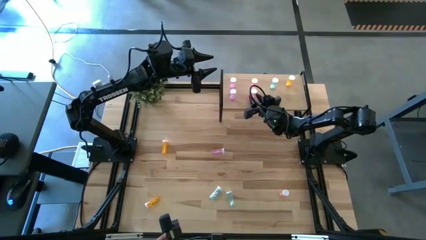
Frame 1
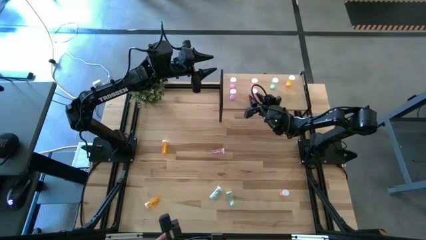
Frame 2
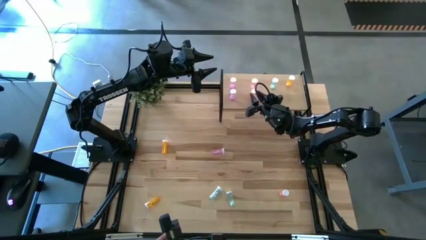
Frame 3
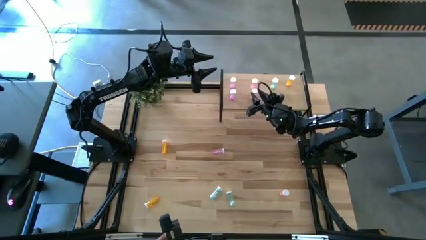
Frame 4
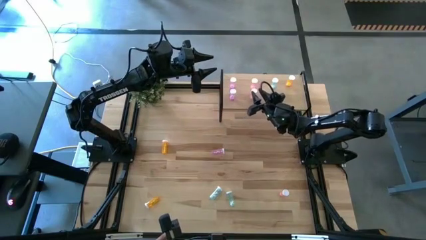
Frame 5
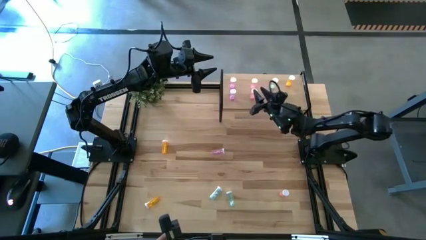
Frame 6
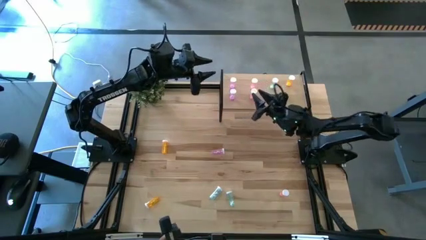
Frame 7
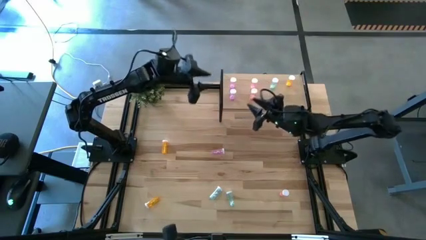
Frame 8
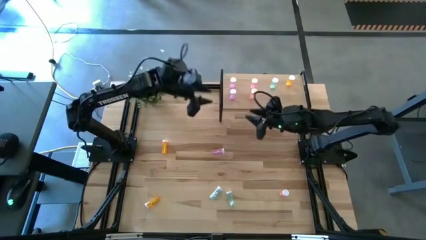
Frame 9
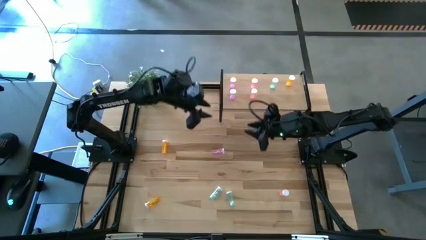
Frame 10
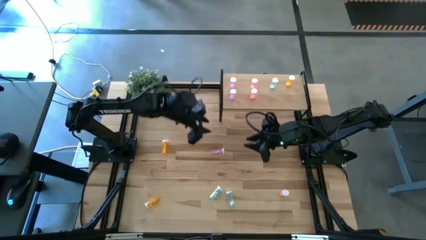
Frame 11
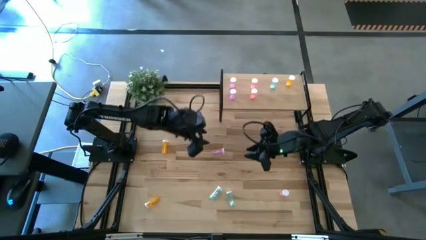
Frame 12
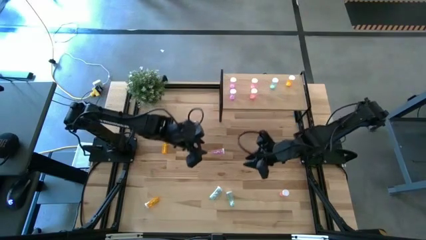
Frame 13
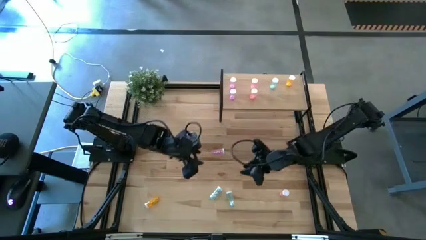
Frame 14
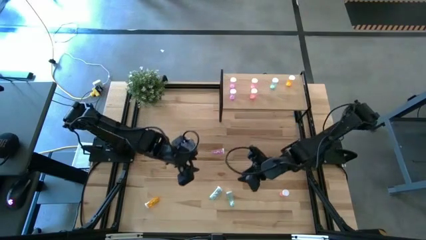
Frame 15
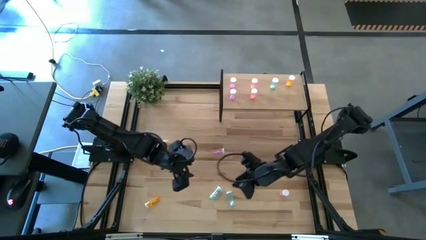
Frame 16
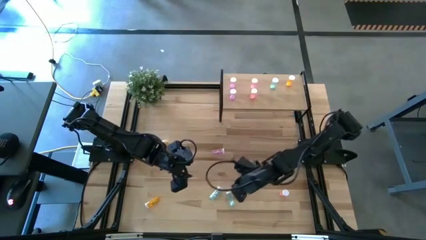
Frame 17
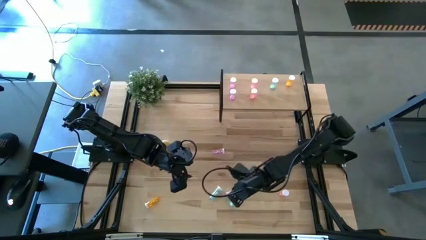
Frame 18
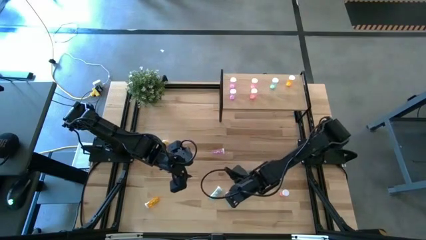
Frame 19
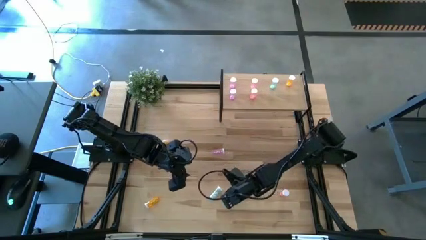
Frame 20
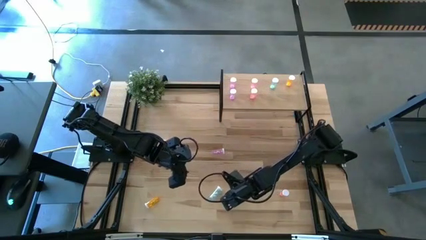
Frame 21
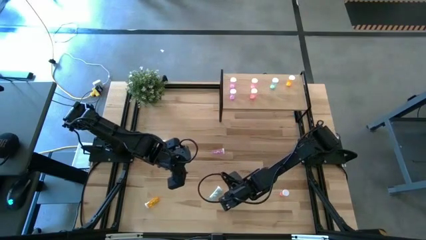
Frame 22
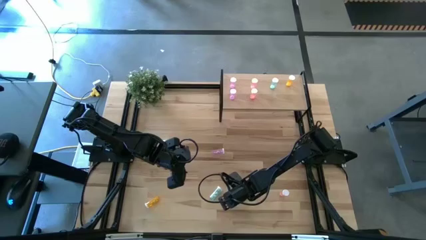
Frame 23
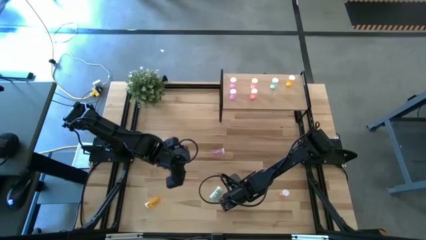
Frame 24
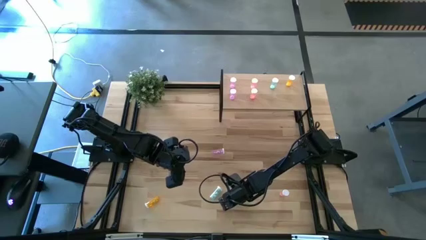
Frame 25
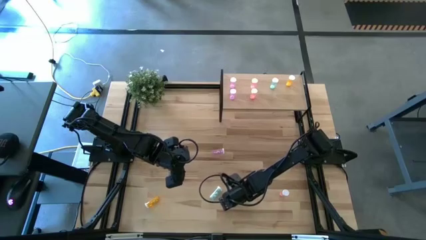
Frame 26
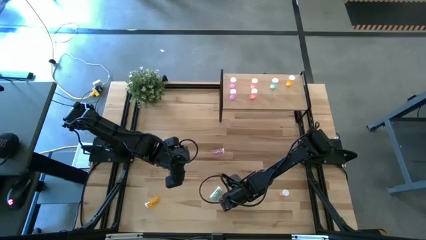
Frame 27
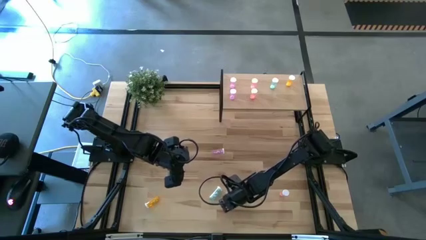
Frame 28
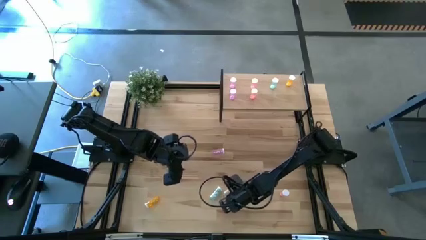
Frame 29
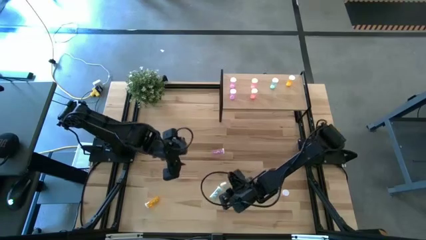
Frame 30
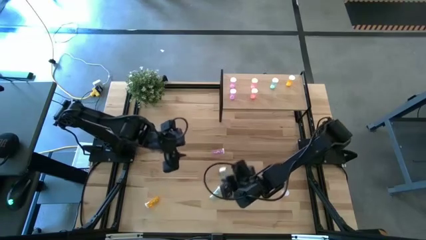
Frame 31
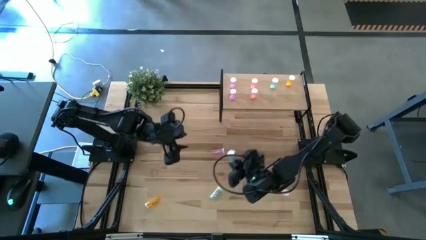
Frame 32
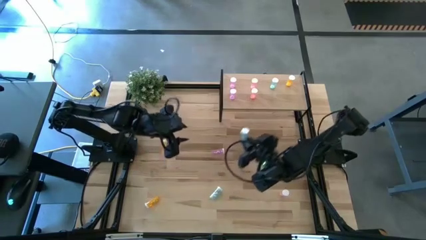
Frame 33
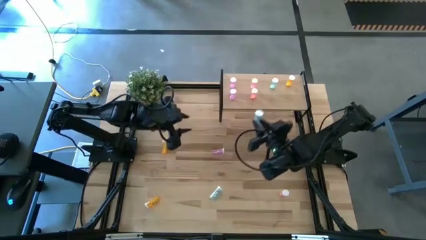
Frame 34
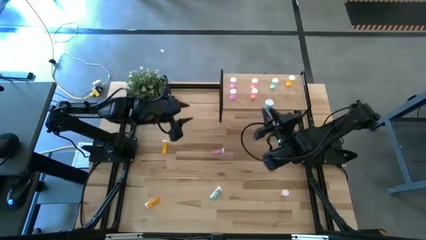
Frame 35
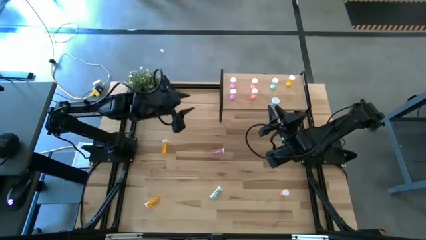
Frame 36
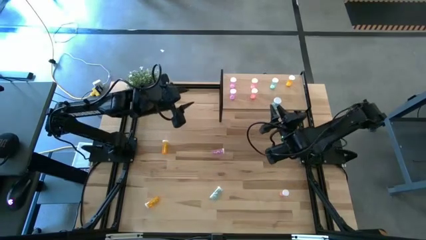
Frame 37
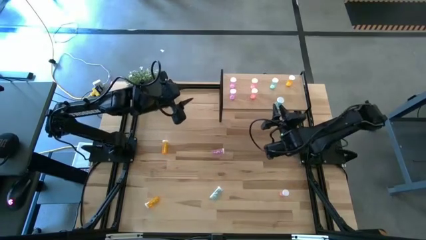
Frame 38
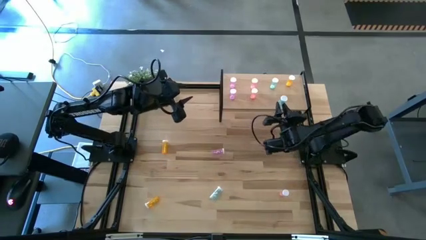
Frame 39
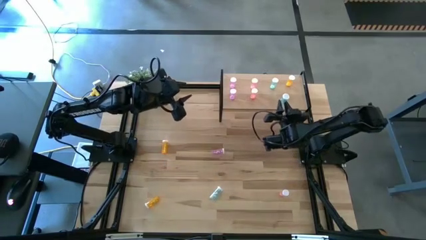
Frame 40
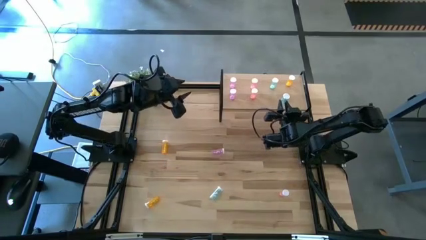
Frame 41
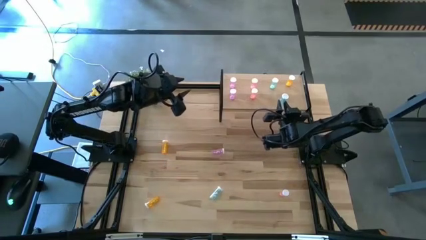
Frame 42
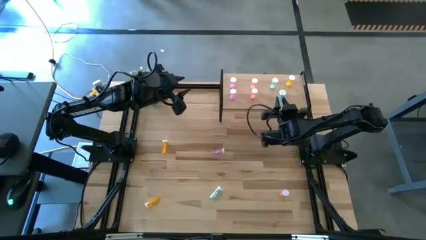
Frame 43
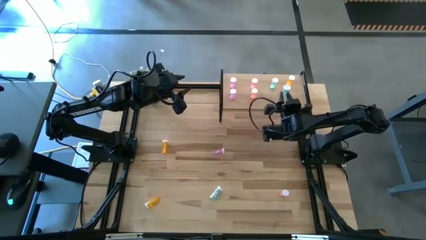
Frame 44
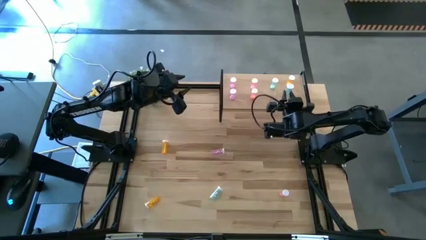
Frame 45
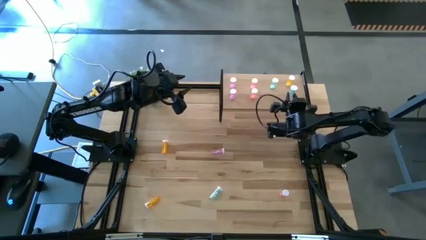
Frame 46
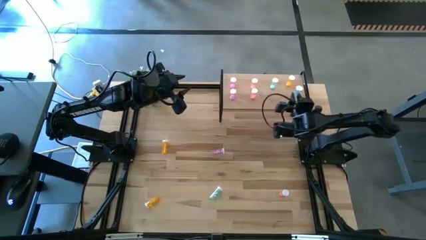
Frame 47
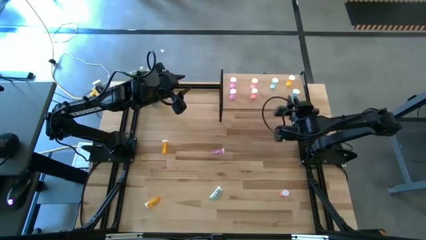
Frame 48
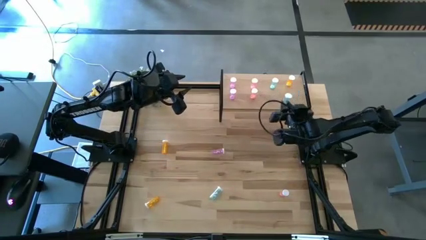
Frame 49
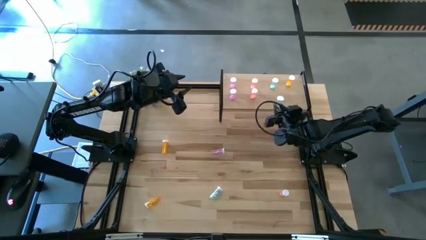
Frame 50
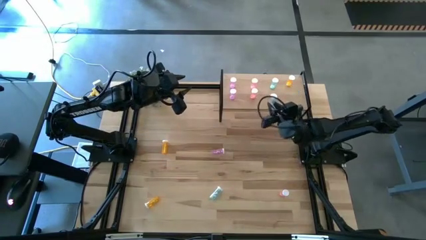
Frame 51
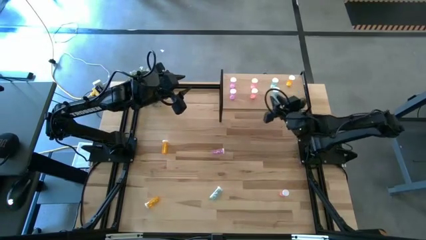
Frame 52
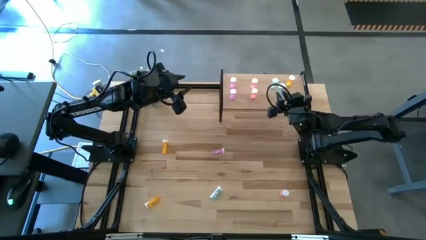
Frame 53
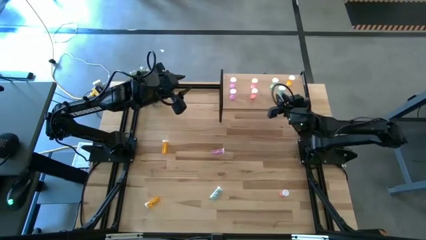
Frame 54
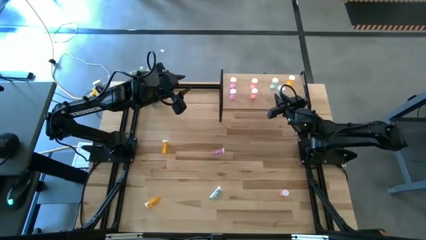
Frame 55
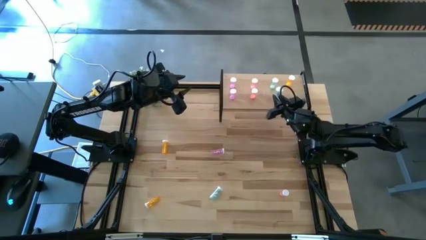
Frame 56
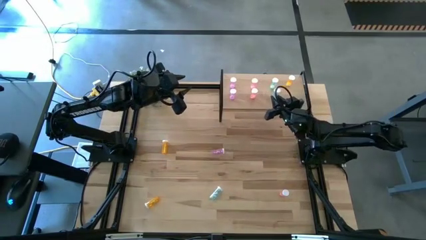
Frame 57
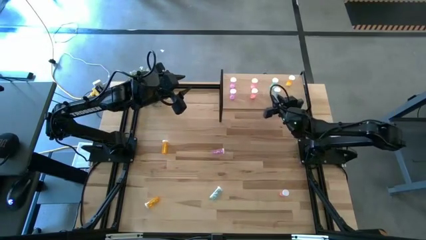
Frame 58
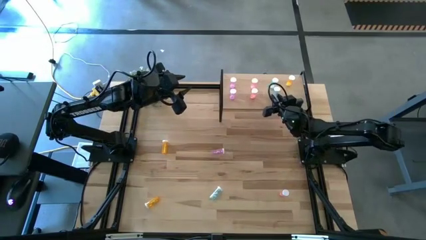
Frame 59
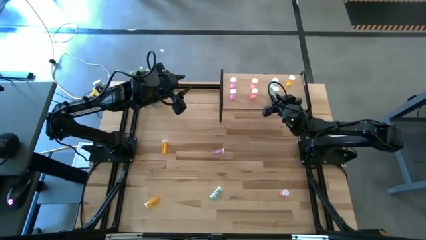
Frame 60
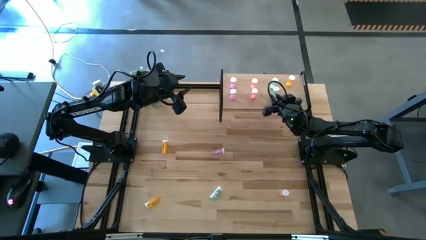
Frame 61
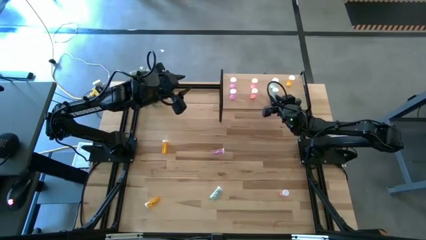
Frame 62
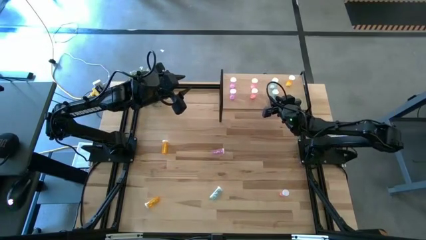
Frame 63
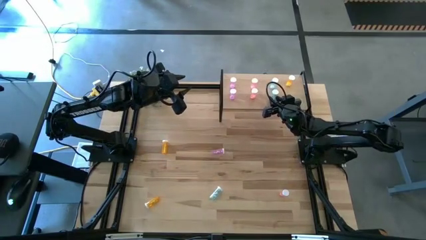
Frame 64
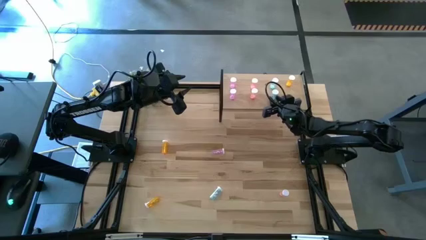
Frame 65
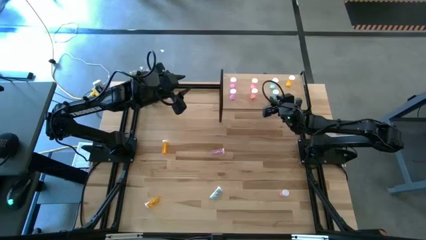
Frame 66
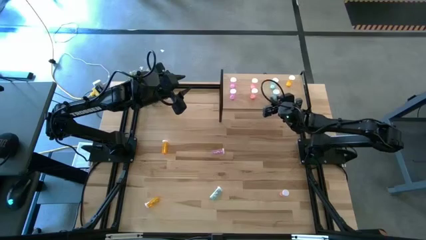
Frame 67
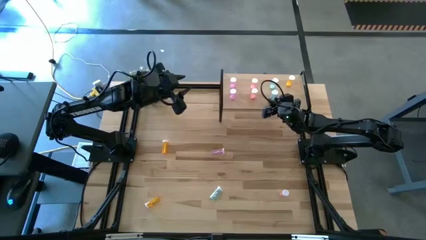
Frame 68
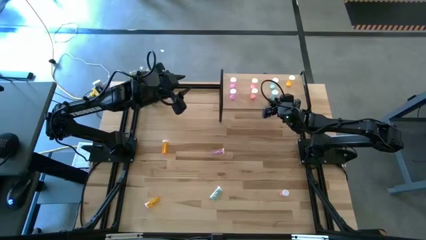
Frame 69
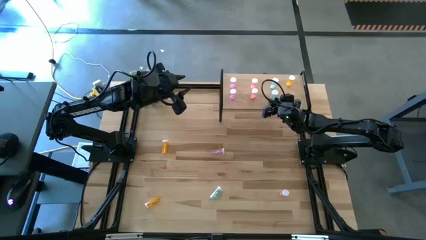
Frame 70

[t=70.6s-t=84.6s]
Task: Pick and place medicine bottles onto shelf by color
Put the right blue pill bottle on the shelf aligned with the other blue pill bottle

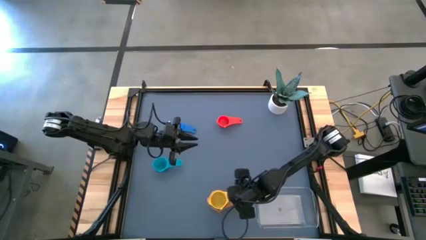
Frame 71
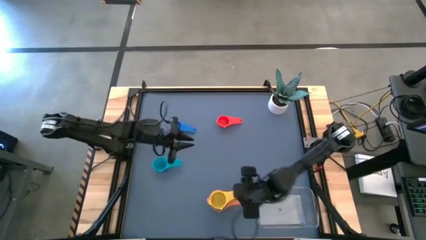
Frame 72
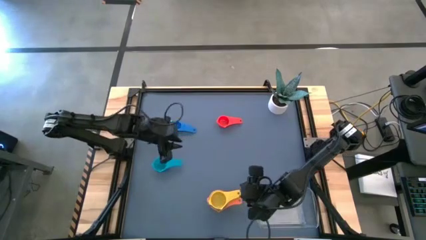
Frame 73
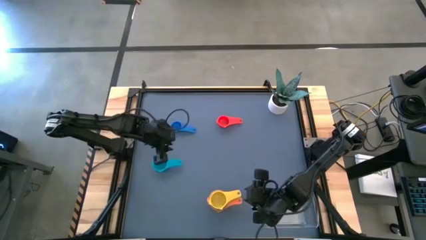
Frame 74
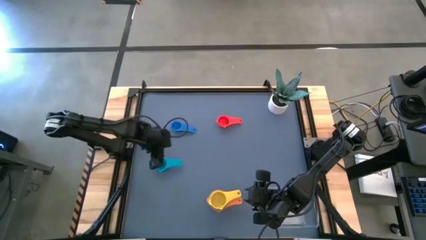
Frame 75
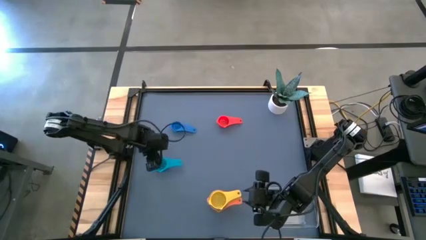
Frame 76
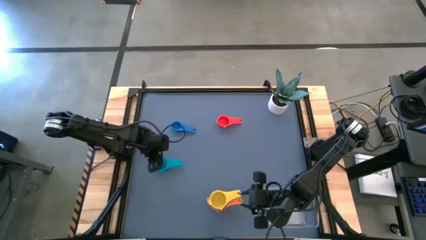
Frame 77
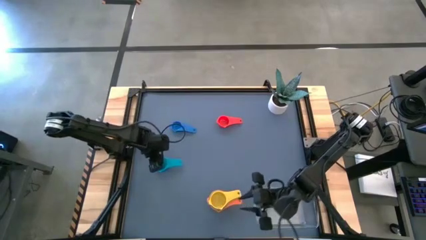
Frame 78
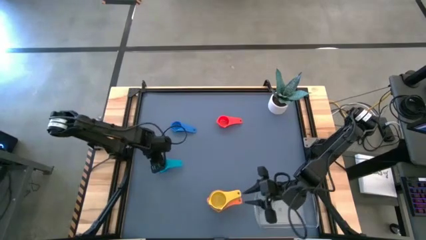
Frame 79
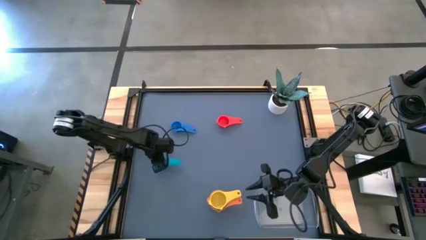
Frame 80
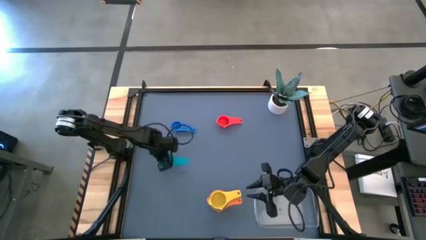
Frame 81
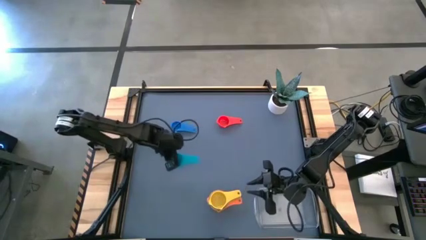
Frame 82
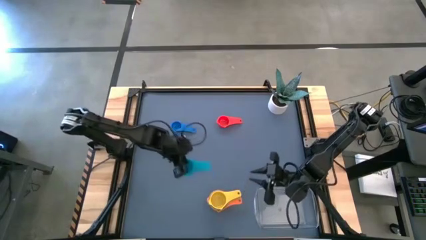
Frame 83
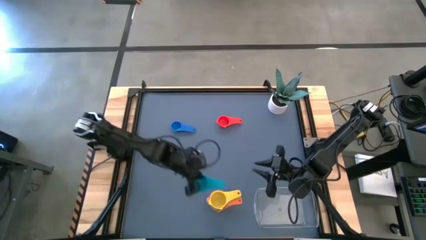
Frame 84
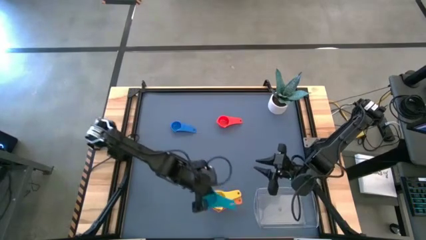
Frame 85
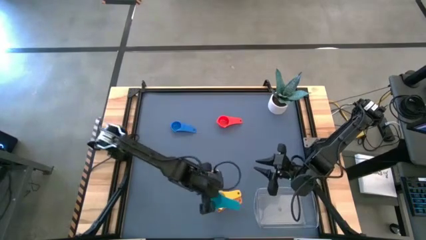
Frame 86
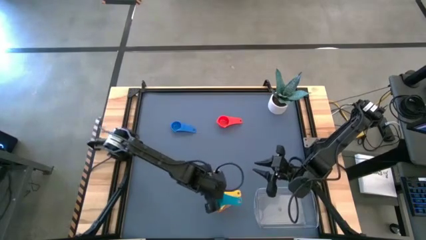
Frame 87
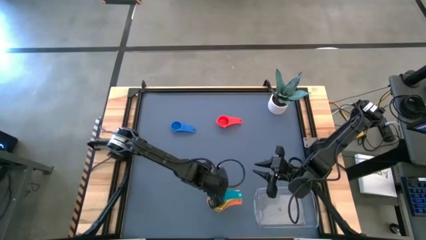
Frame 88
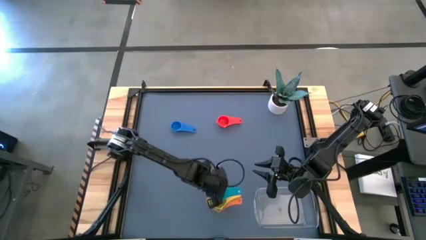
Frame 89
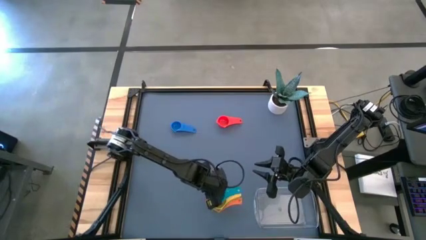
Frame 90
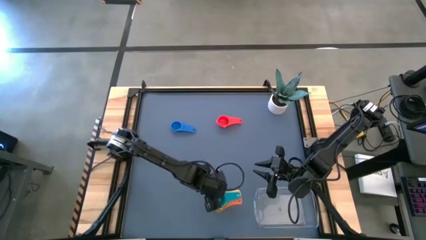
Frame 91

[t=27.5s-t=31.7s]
Task: Nest measuring cups in basket
Stack the light blue measuring cup on top of the yellow measuring cup
